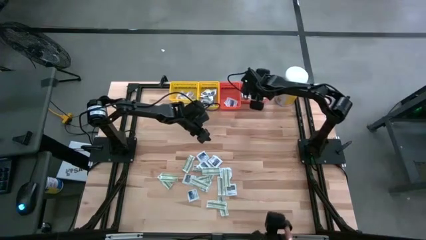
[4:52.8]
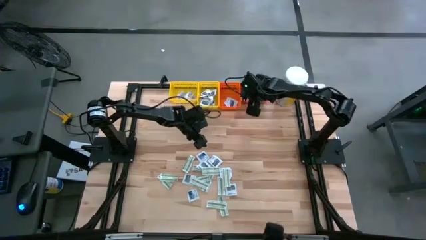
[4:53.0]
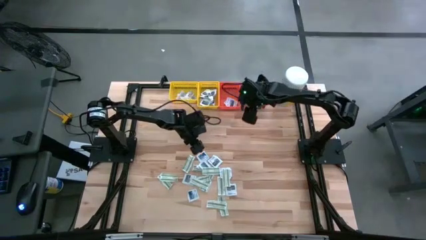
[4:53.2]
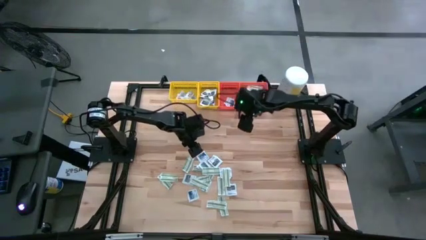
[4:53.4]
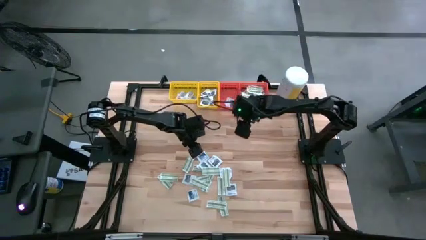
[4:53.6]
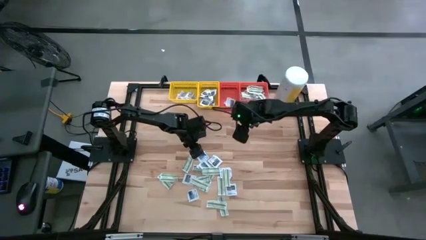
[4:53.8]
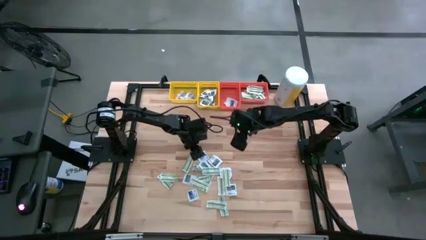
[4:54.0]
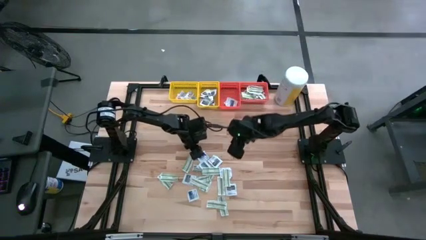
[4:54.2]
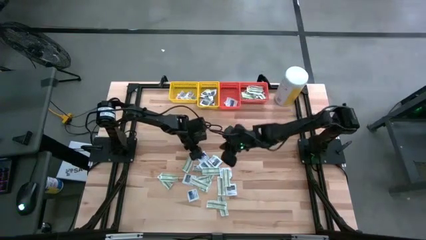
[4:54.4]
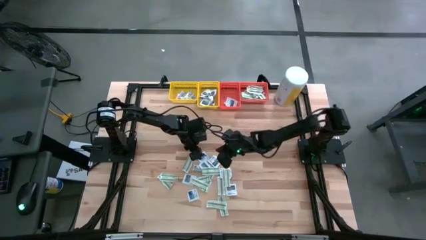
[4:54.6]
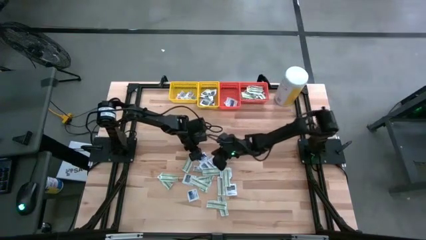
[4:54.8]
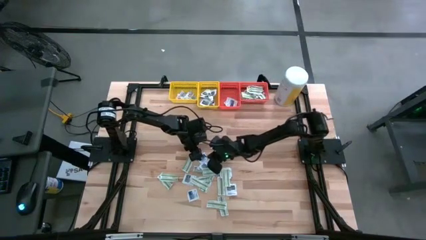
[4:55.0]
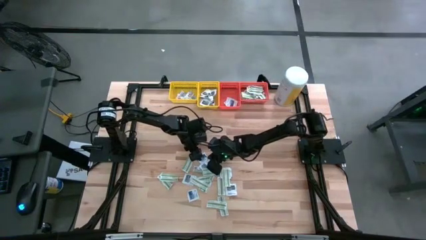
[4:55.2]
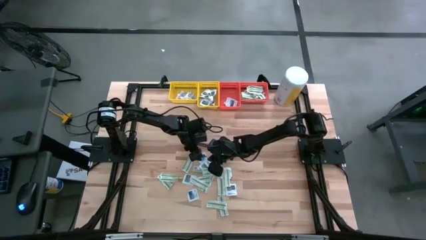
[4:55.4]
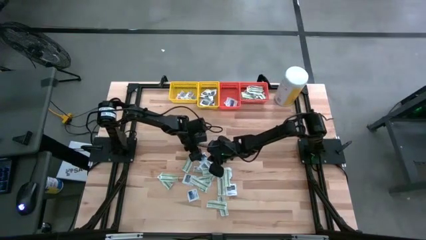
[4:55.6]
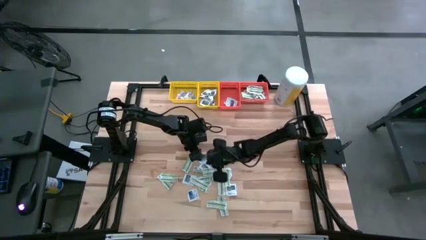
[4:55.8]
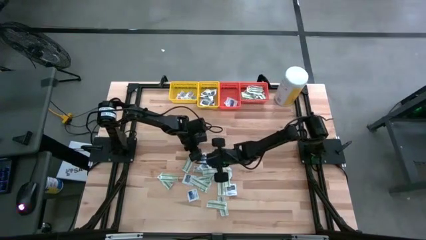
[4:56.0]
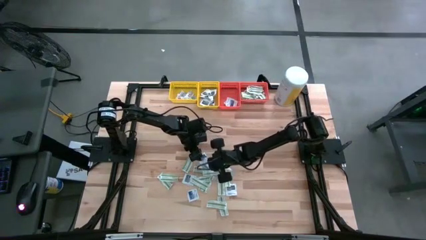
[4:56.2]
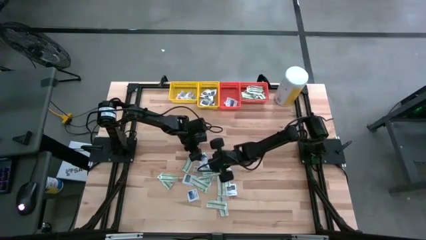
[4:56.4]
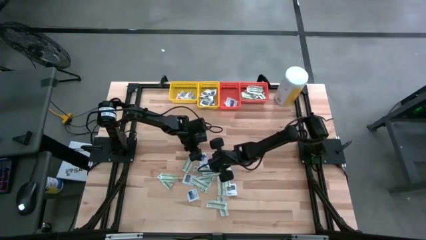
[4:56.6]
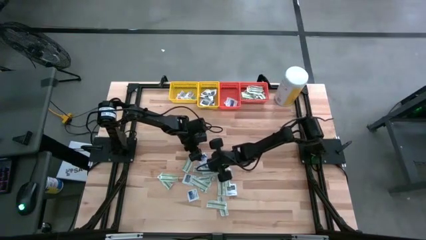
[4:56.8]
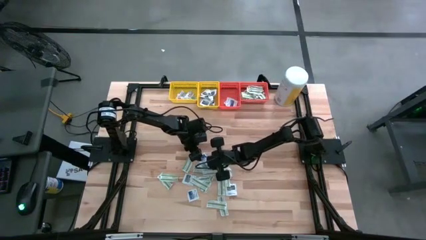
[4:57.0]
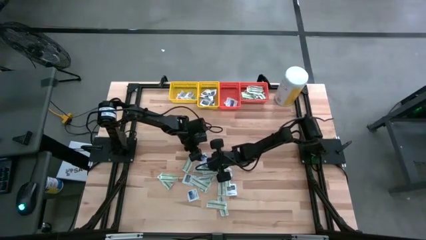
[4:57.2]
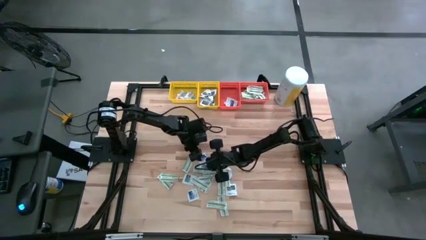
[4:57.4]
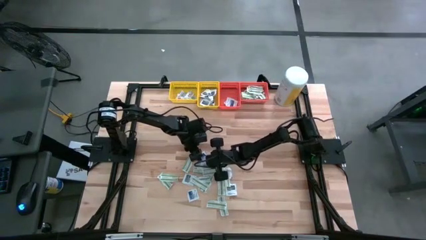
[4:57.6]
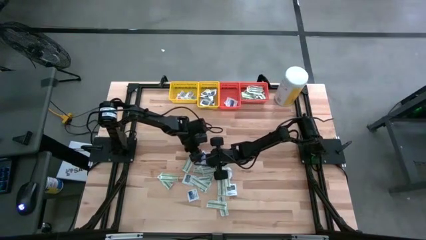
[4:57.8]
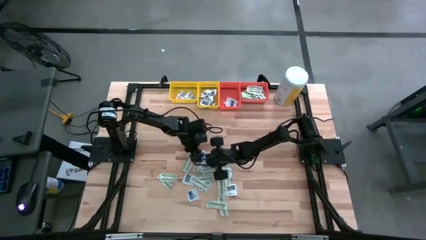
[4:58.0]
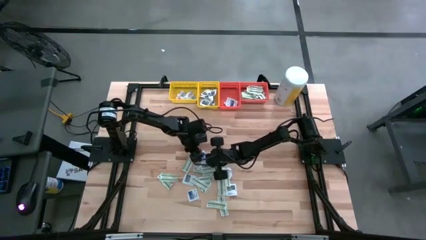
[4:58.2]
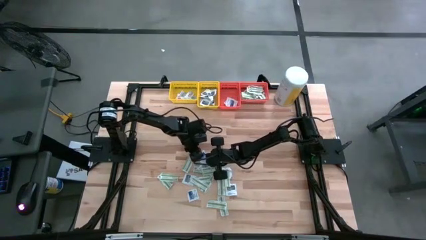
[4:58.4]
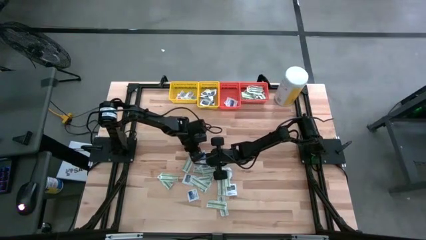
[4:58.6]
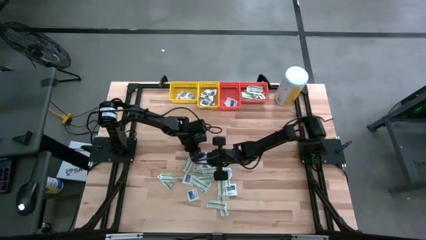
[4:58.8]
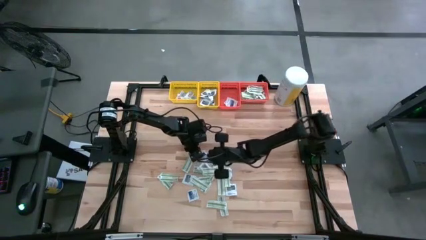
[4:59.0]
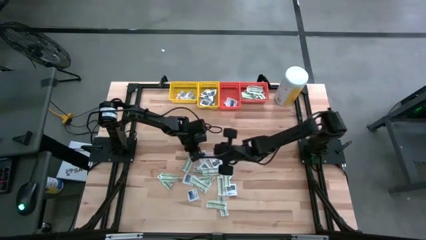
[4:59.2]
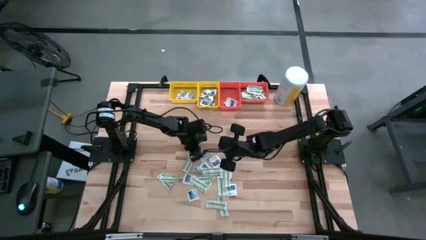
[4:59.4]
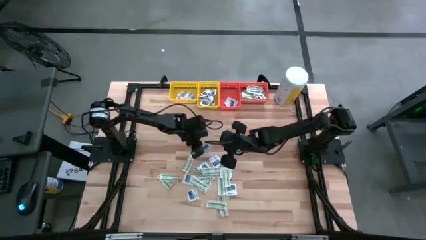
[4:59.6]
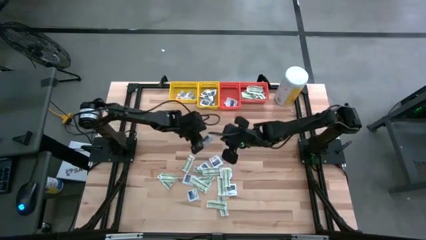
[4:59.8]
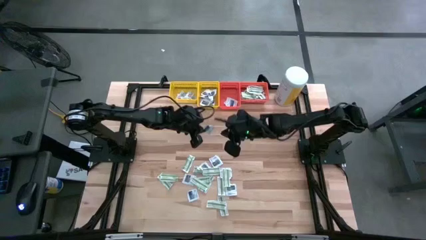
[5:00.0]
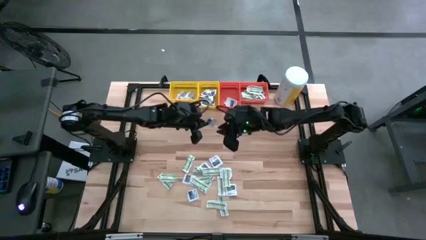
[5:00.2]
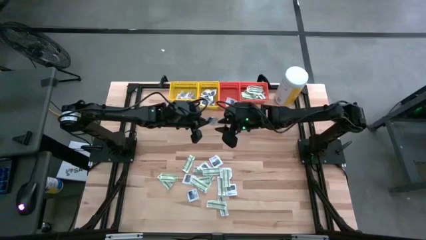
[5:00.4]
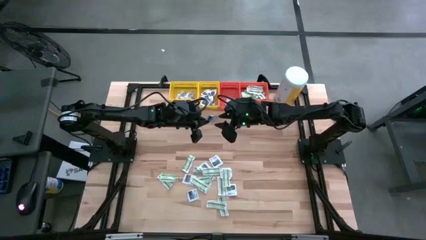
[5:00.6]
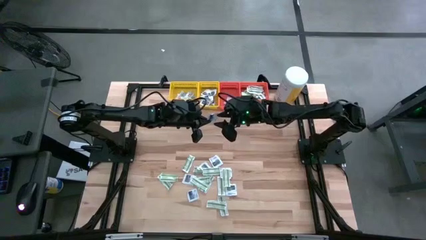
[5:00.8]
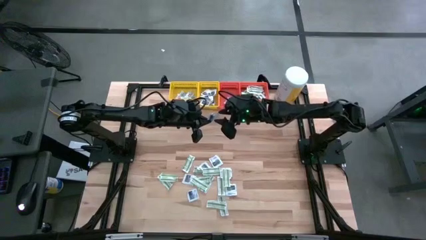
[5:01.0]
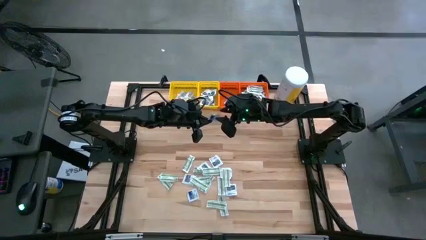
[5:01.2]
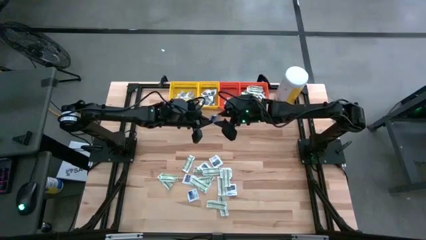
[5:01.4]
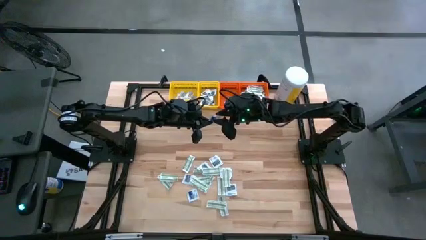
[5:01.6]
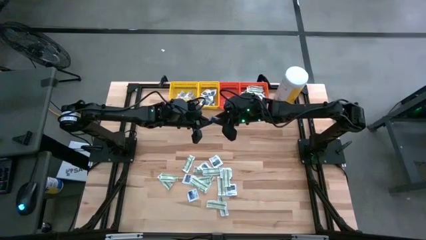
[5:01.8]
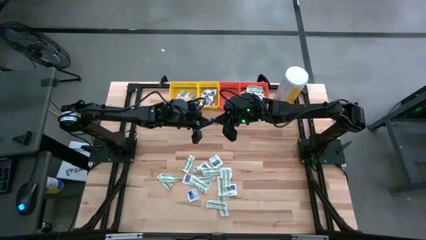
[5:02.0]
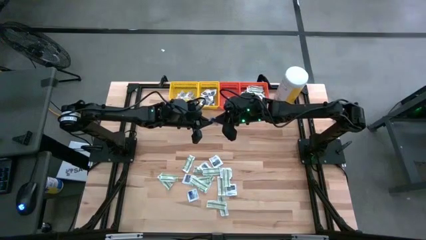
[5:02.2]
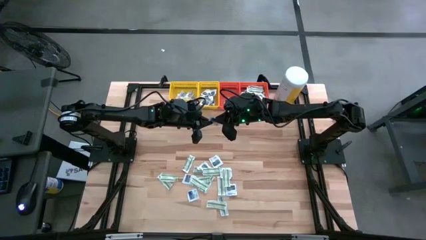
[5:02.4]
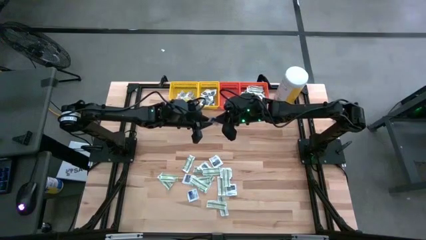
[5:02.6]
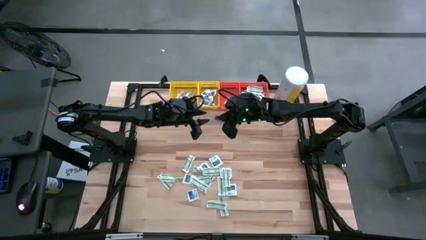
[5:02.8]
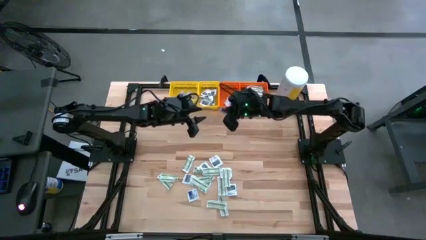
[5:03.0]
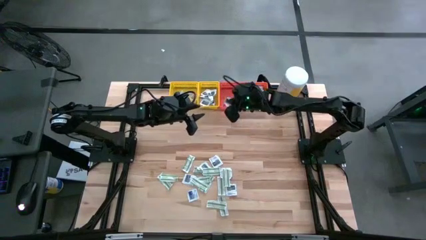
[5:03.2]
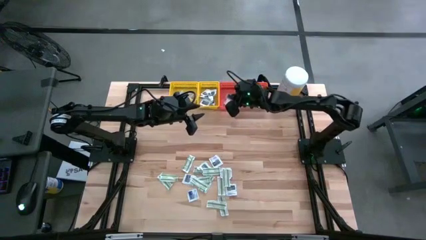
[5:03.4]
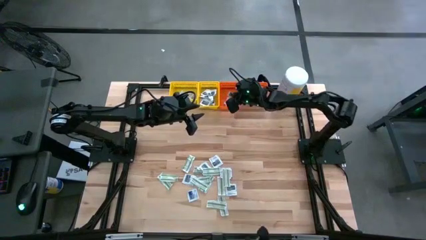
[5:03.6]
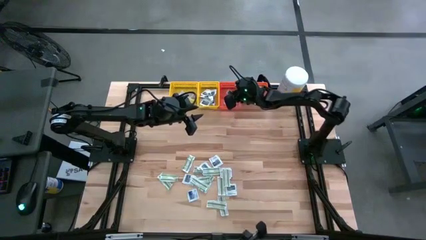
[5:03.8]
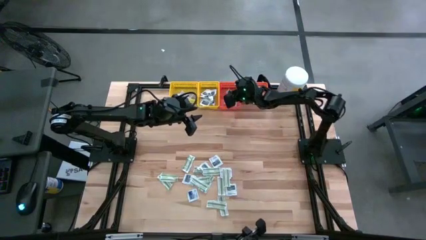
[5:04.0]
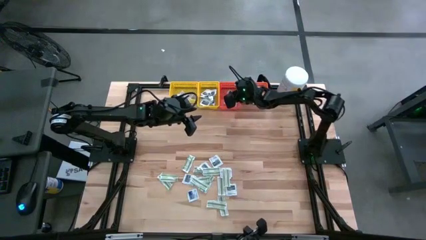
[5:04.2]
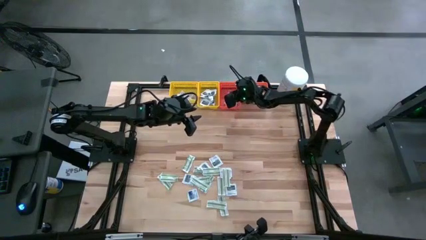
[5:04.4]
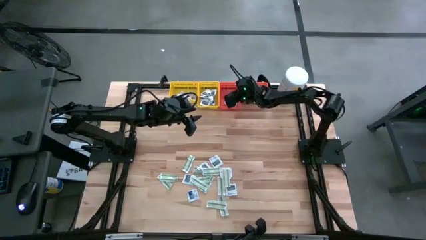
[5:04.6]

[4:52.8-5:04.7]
Task: Pick & Place First Aid Supplies
Put the orange packet into the left yellow bin

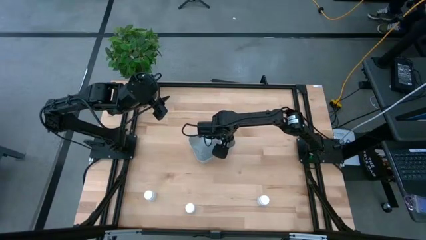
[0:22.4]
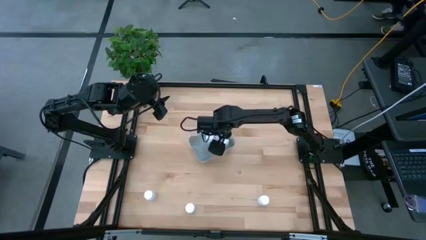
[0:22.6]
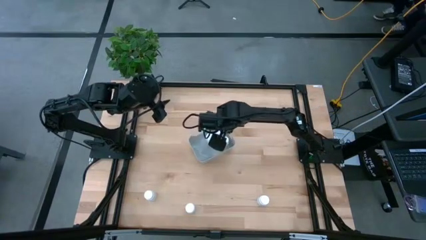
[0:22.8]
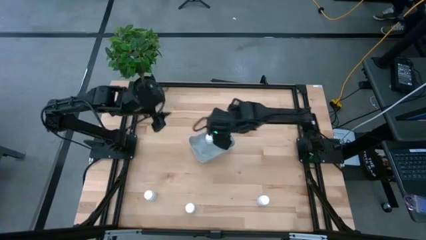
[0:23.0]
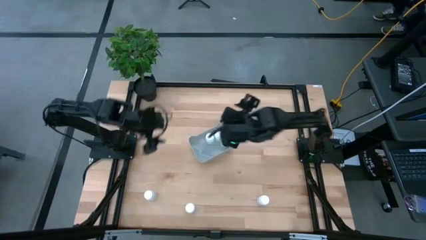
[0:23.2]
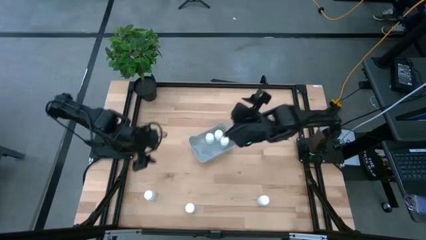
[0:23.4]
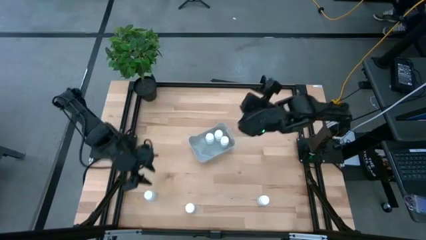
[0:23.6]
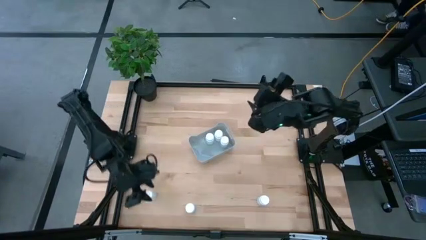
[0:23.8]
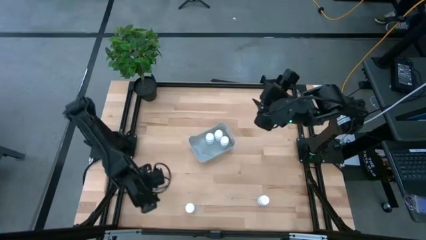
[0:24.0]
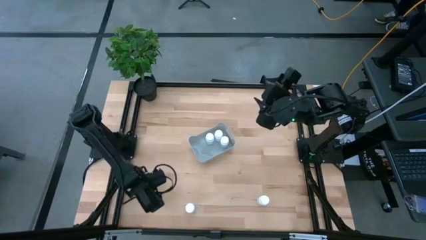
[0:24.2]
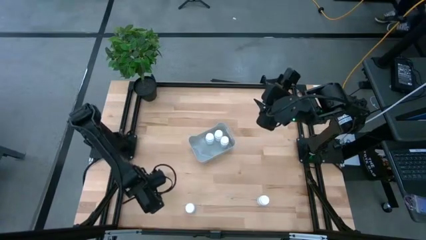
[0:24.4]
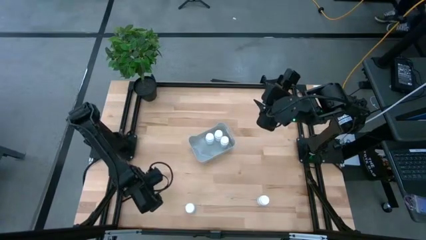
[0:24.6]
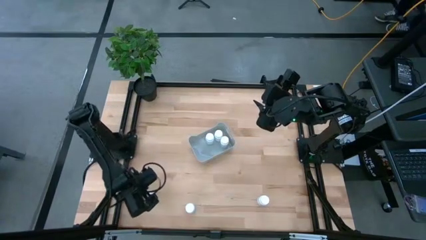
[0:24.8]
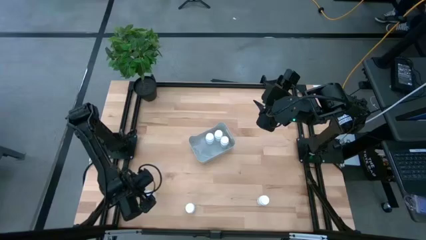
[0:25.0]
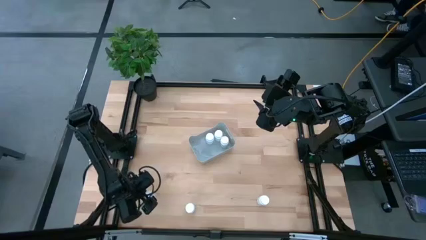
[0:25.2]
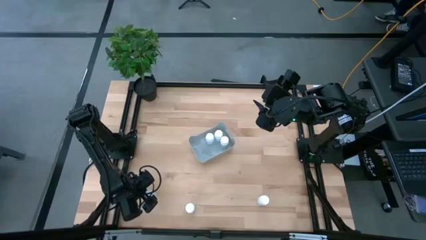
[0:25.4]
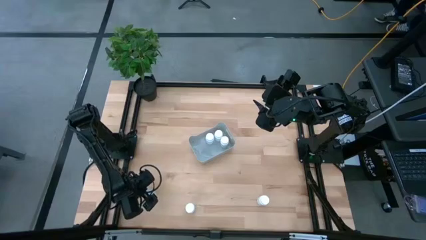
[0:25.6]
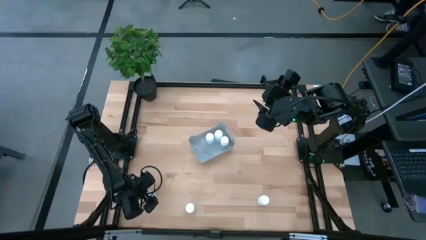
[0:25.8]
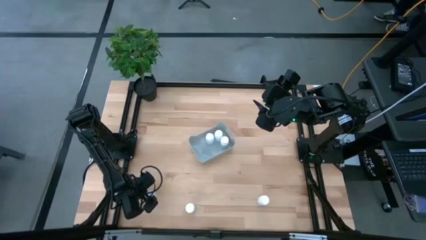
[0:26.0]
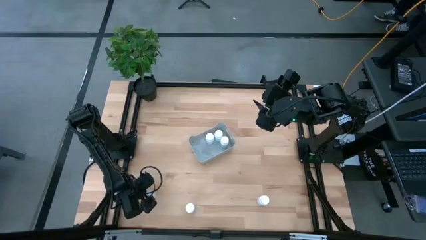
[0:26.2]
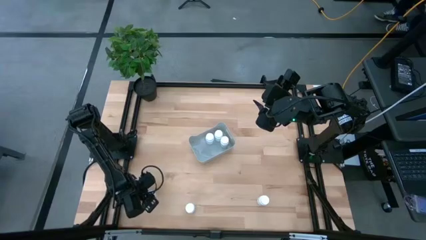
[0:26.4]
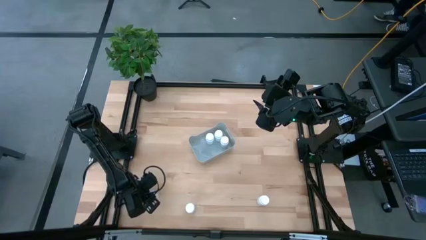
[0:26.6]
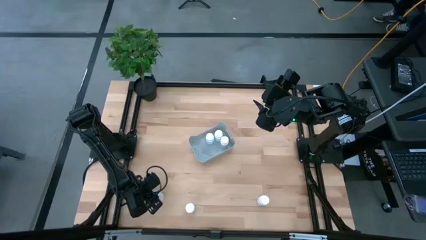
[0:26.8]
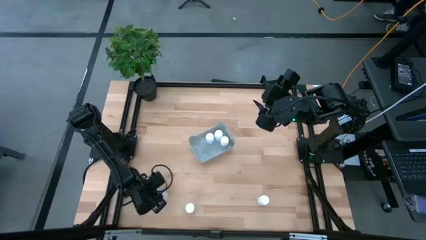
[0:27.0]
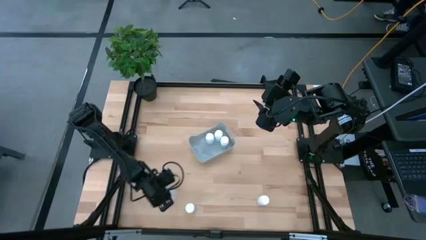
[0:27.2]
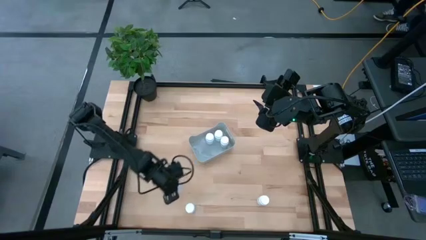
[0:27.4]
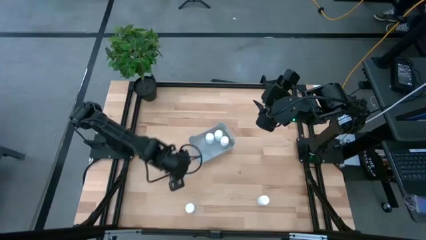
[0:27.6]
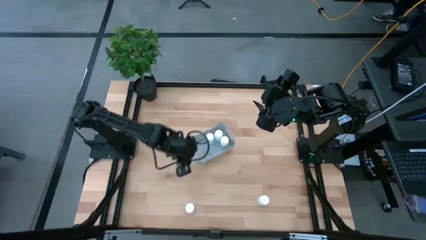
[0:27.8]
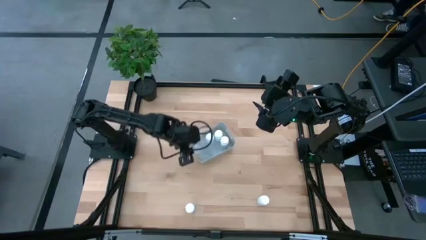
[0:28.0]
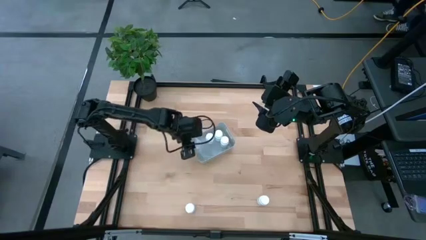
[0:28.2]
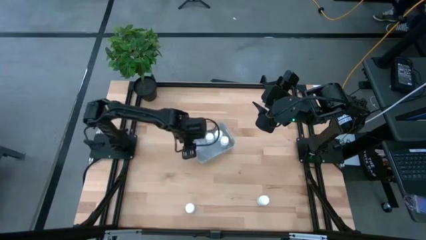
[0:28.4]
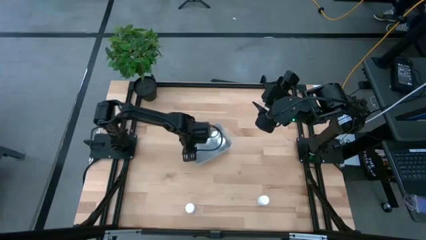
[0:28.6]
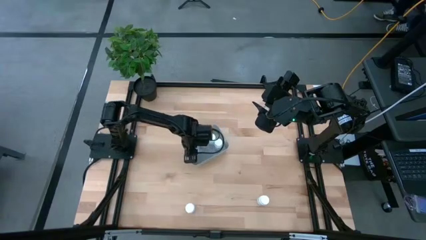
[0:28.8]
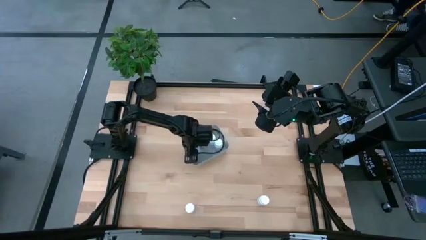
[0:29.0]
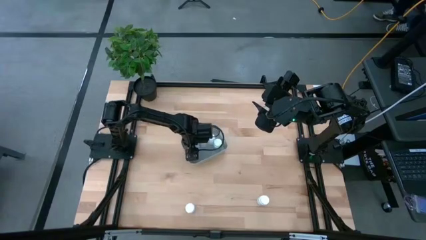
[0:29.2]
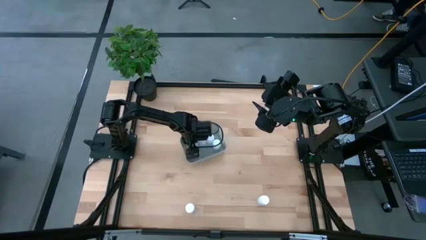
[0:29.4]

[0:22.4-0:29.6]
Task: Pick and place pill bottles into a basket
Put the white pill bottle into the white bin
